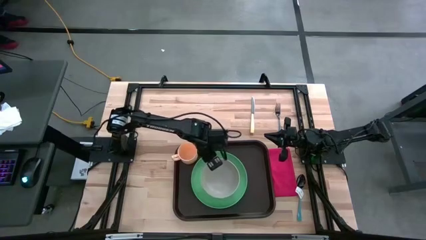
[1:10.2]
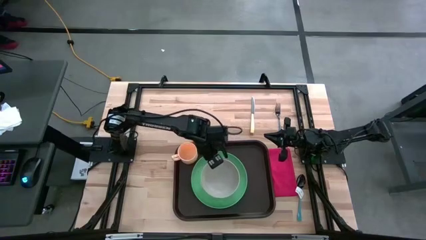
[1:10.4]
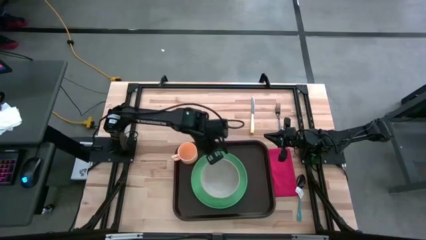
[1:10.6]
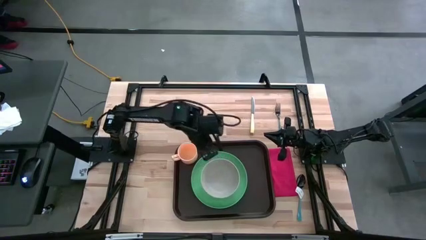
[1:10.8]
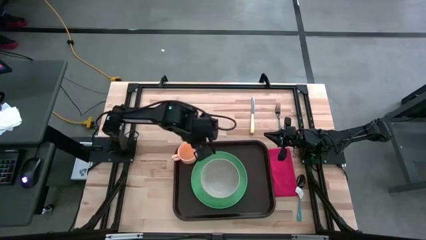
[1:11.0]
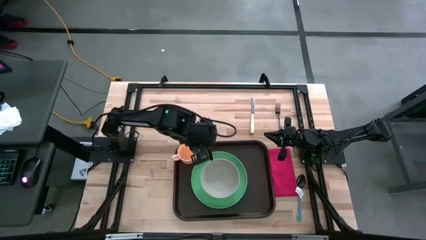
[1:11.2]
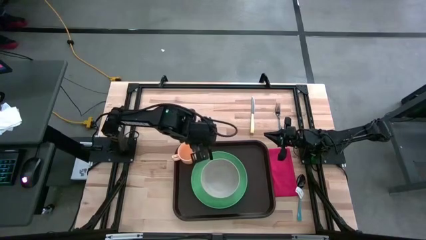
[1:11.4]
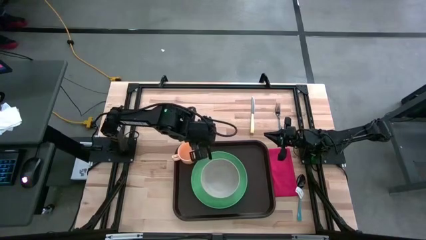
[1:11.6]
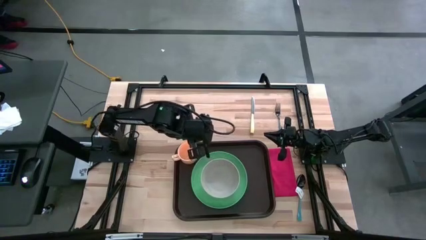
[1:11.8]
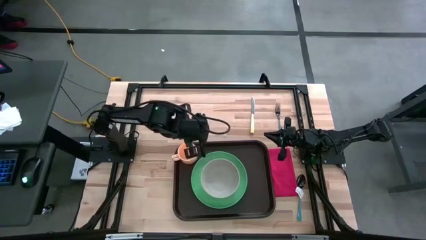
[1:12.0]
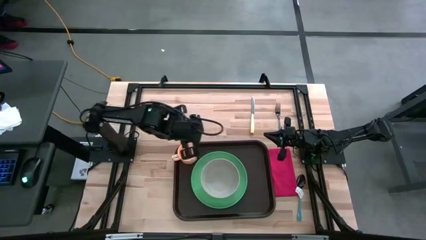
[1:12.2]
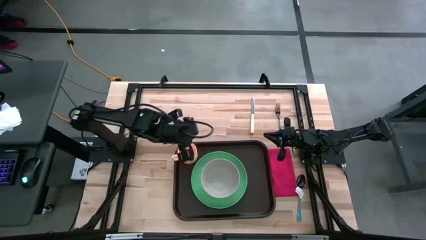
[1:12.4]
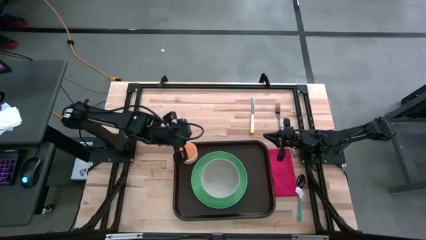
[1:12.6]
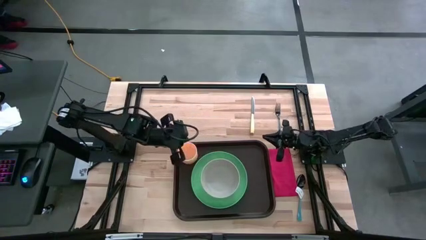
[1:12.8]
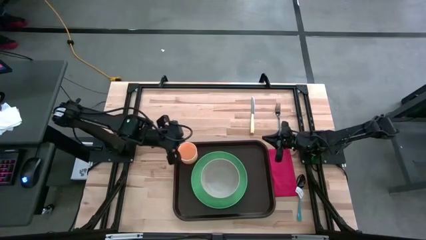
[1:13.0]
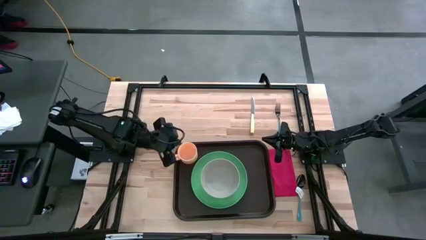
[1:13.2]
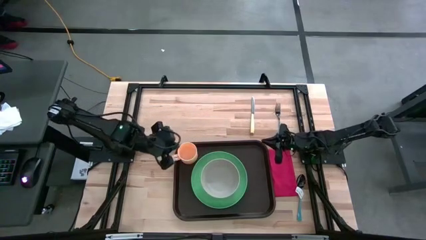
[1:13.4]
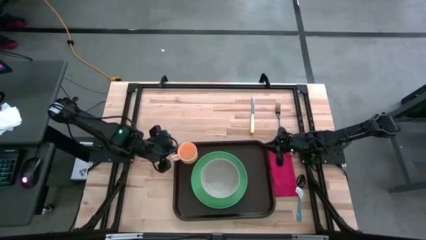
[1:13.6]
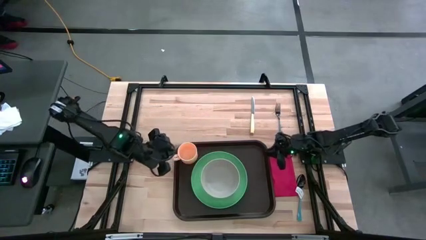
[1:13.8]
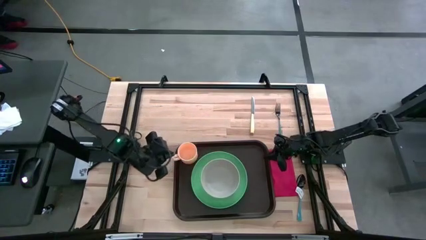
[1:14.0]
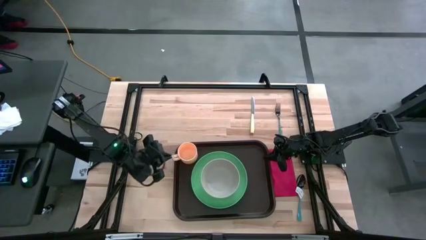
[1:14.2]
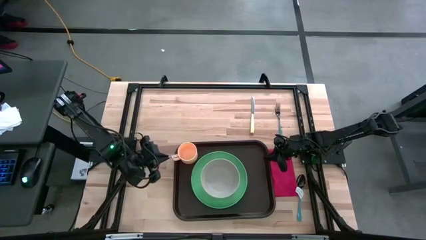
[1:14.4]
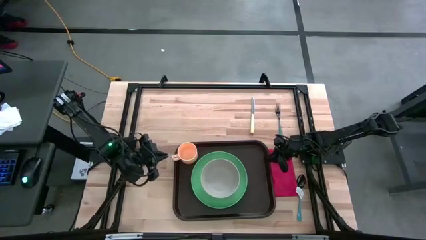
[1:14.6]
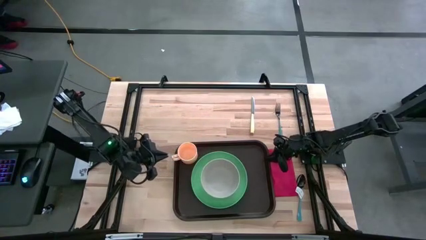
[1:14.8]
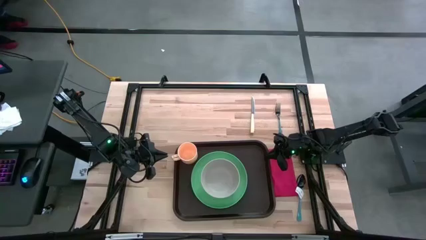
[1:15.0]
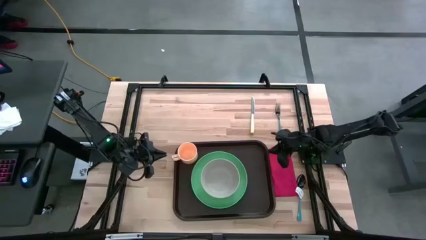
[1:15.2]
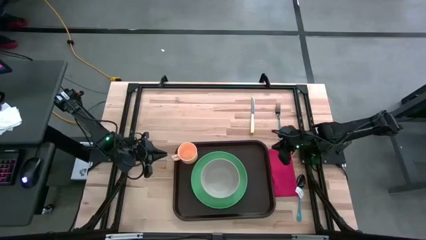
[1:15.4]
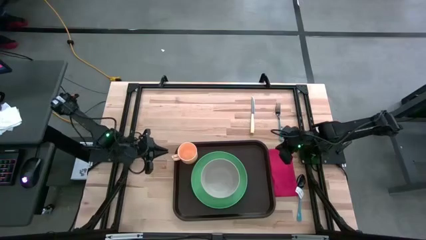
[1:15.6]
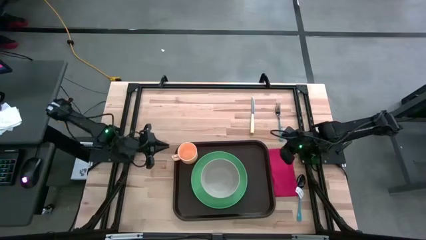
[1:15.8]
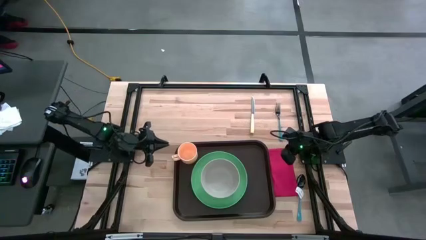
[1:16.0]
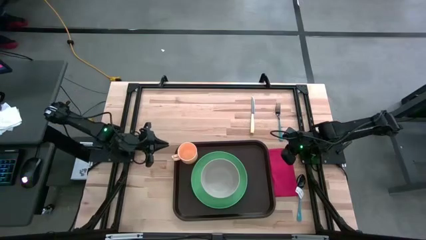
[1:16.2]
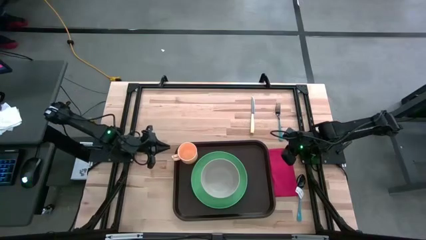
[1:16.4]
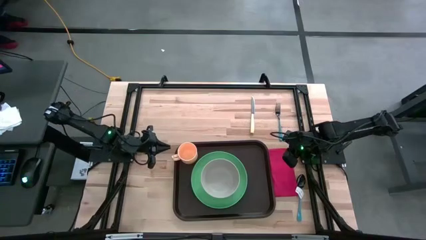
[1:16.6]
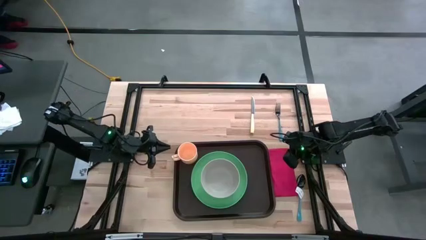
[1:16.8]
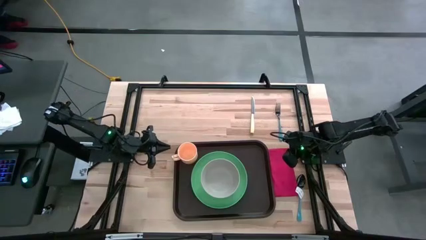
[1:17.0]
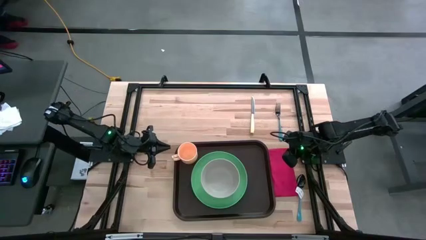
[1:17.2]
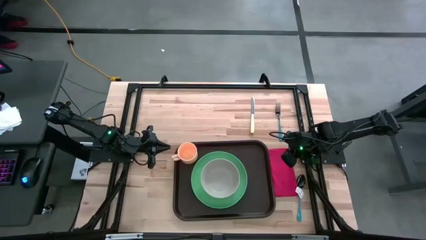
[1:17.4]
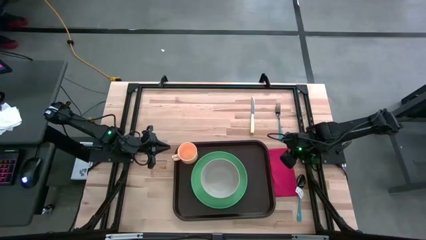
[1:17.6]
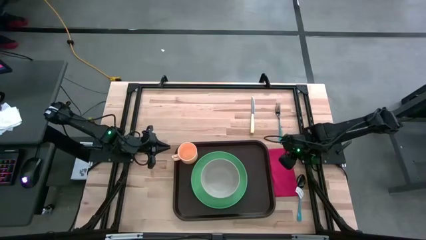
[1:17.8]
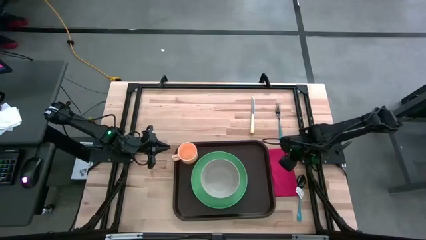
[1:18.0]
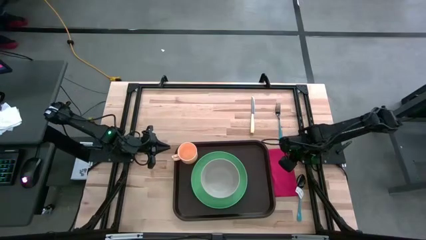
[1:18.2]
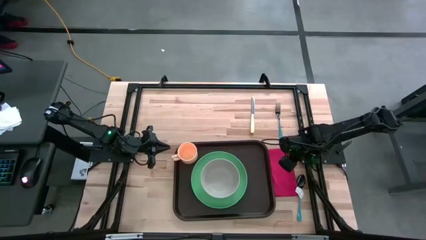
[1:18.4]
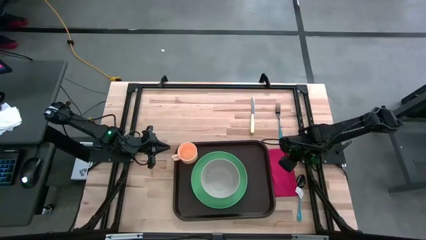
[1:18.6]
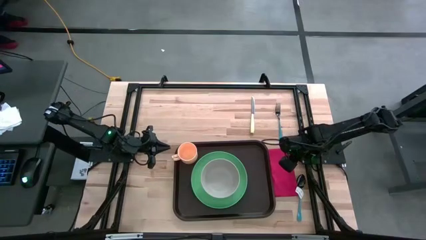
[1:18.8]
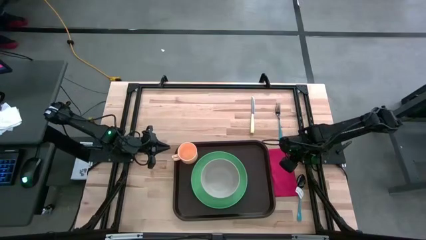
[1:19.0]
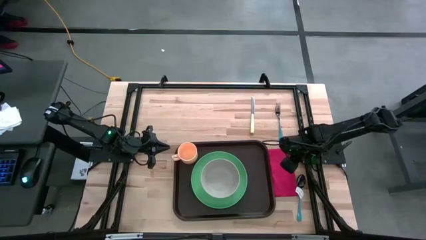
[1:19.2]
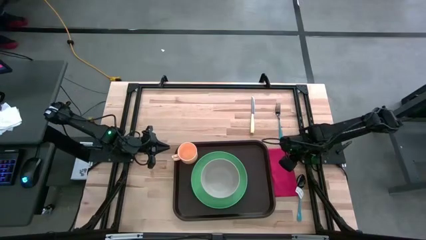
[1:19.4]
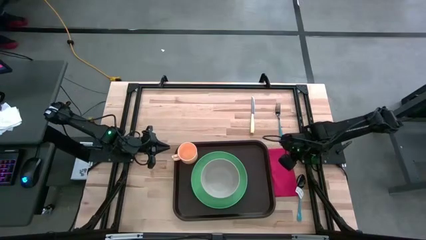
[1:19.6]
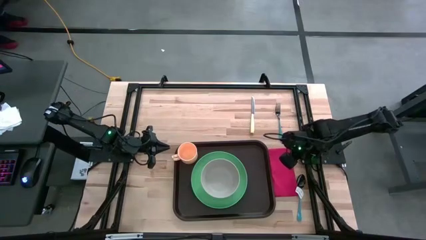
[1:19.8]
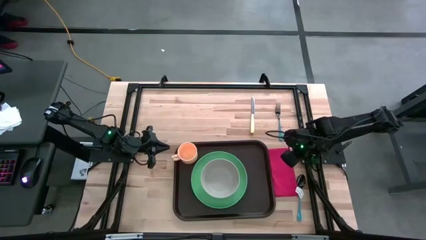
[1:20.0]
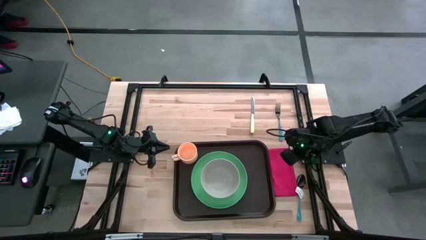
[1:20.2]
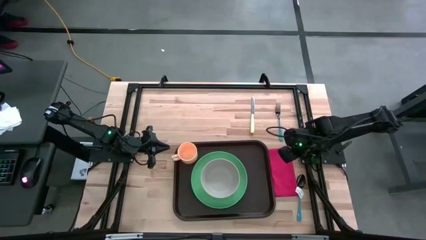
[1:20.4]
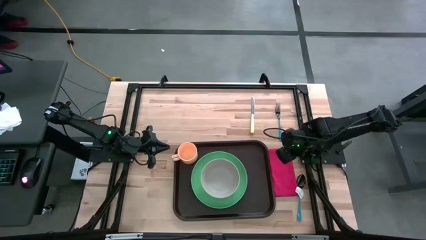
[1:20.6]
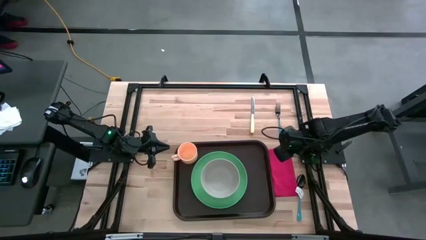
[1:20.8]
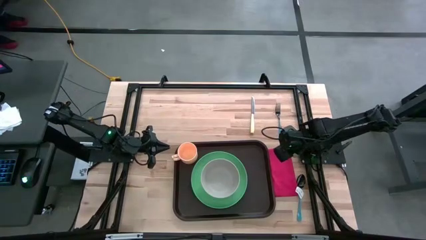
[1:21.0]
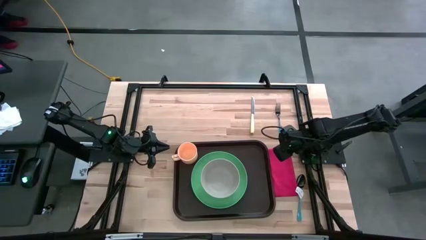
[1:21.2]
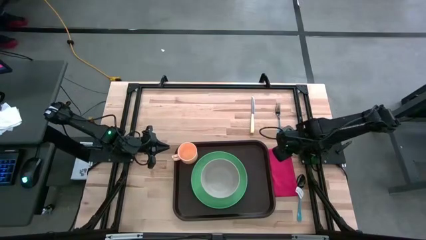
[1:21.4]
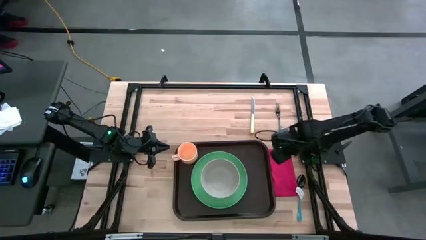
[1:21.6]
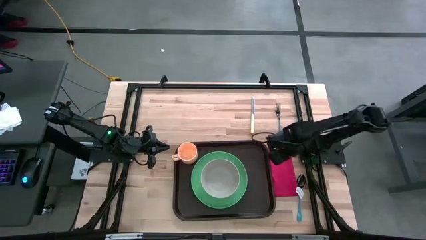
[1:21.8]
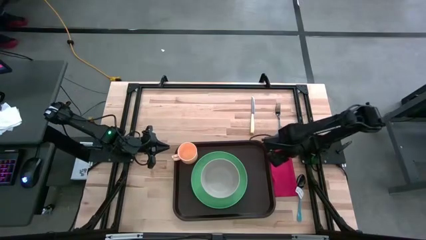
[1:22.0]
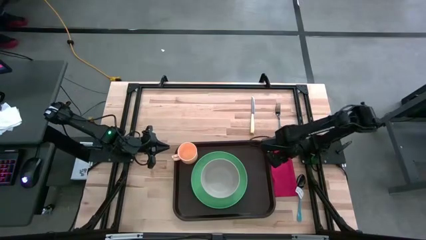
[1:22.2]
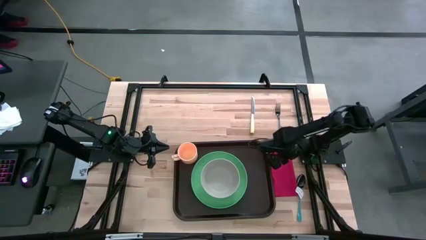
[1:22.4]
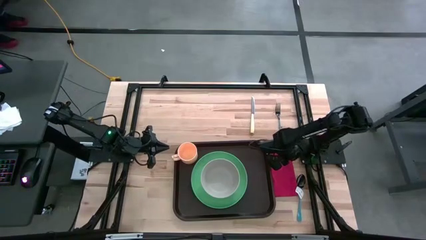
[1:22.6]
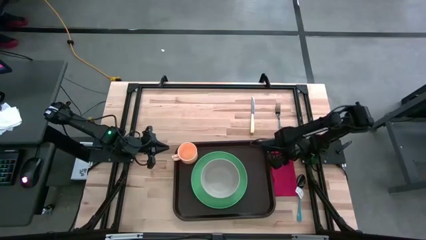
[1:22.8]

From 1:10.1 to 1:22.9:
Task: Set up tray
Put the red napkin beside the green plate on the tray

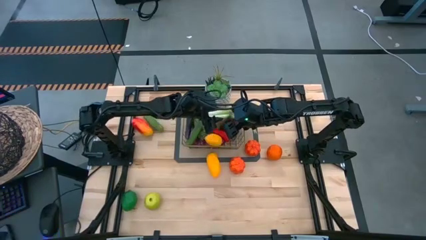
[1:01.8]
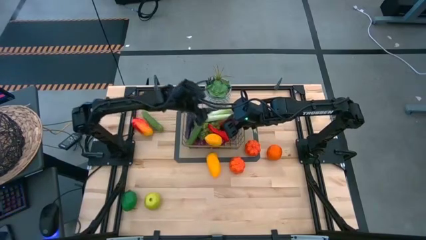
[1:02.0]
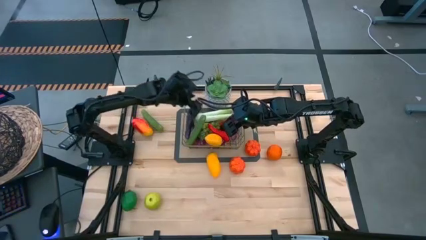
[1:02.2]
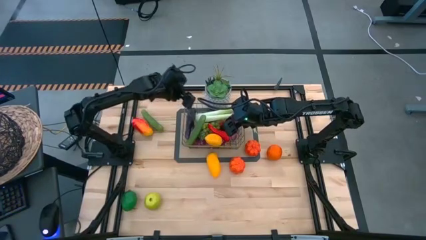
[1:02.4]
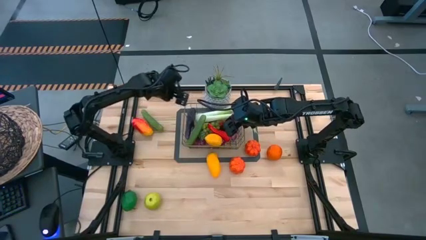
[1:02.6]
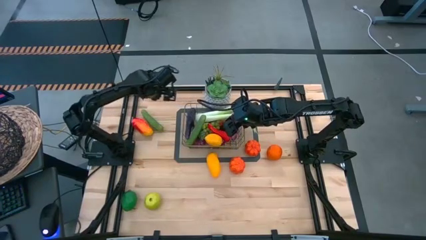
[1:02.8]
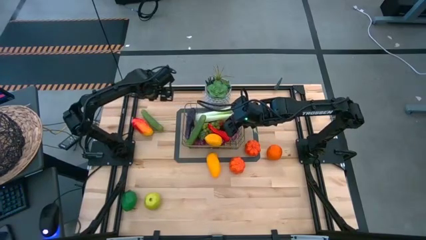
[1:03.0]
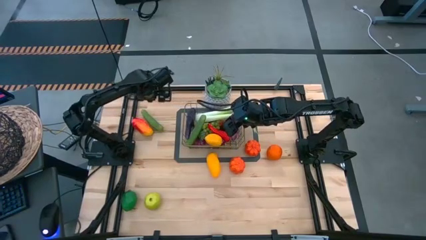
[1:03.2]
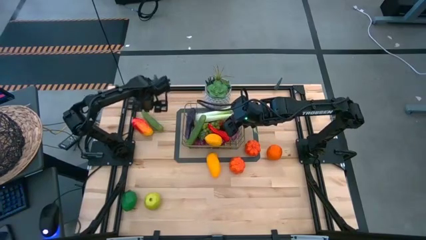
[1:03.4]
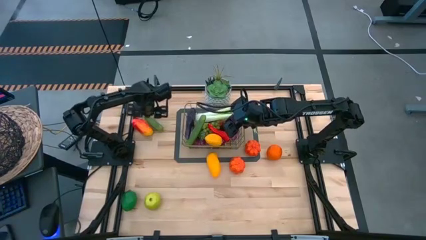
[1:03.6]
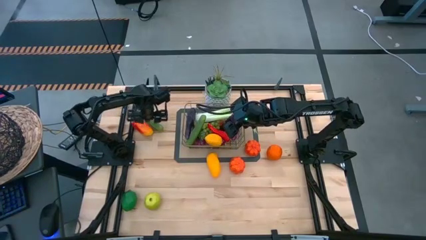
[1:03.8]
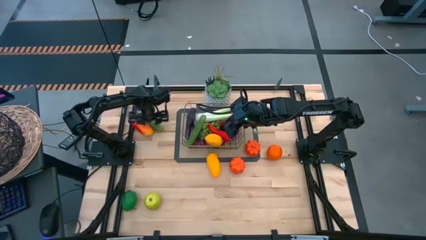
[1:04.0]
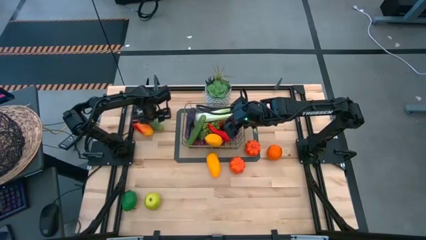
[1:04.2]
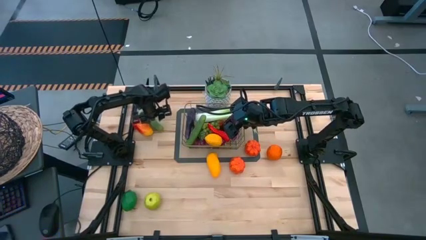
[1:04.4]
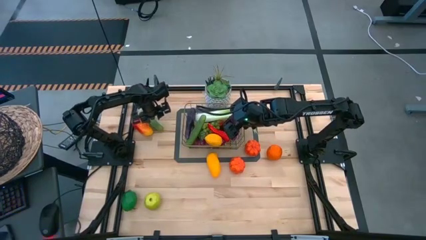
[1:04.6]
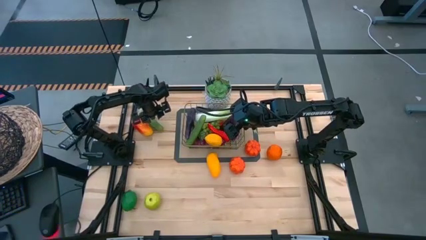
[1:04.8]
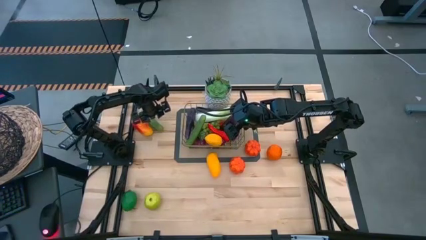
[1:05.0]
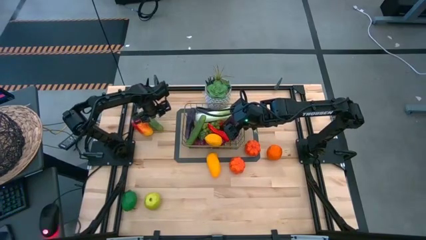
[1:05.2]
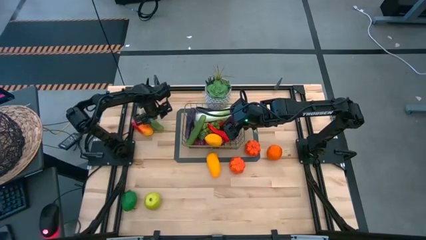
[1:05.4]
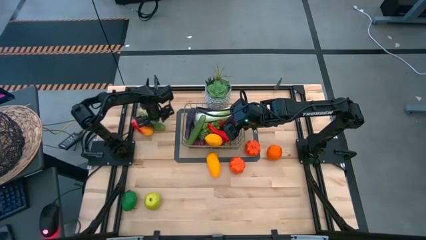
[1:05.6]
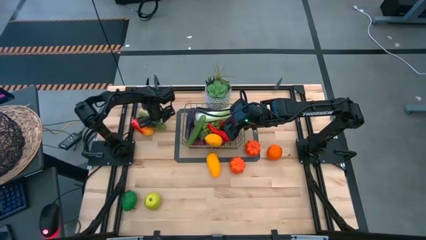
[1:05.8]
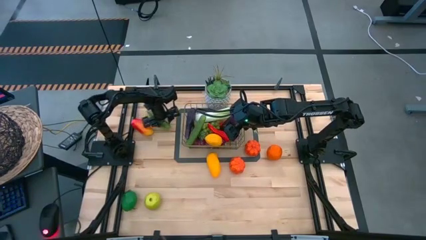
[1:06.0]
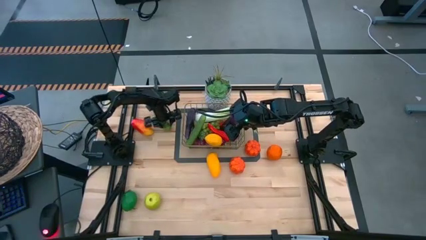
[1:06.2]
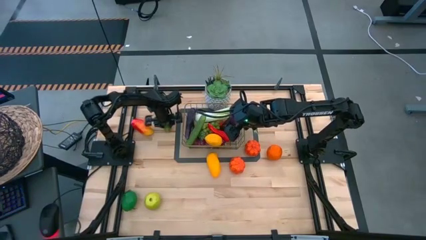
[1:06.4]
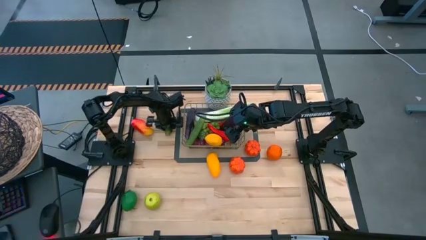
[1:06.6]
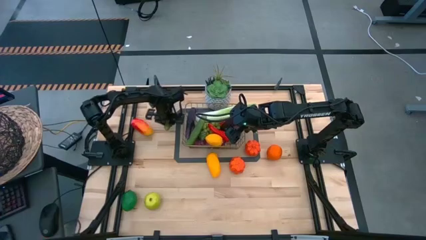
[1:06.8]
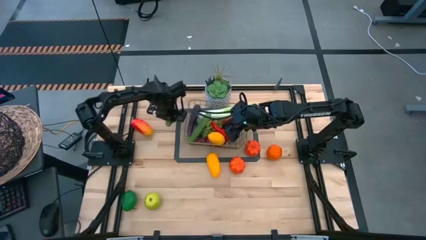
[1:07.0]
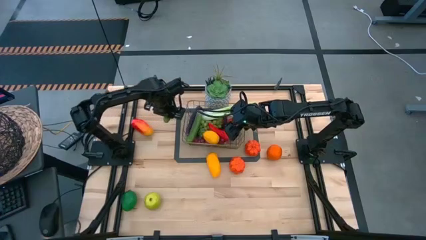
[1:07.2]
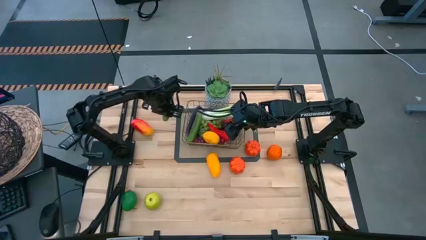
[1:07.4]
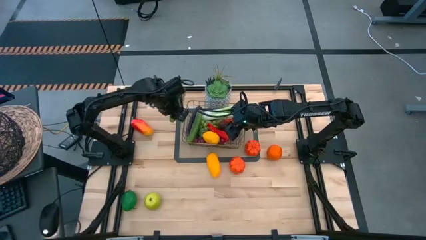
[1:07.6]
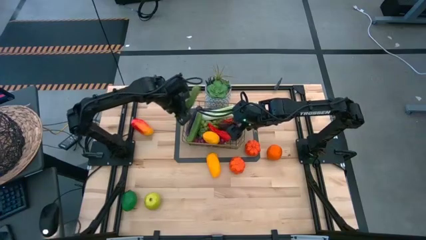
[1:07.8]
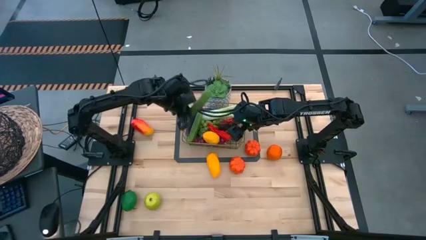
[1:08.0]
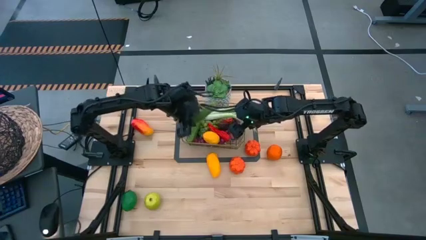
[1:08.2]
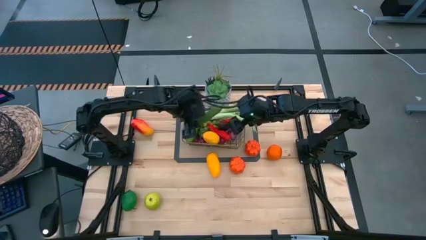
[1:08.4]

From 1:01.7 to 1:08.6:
Task: Build produce basket
Put the cucumber into the wire basket
